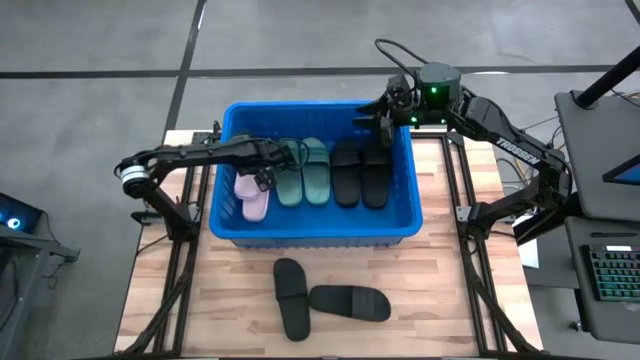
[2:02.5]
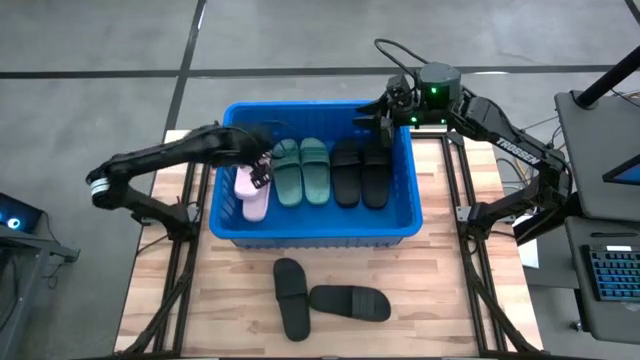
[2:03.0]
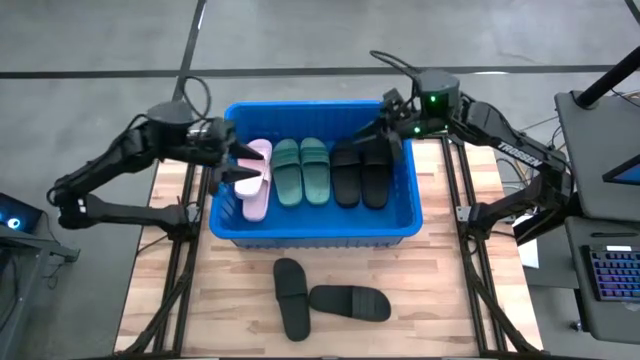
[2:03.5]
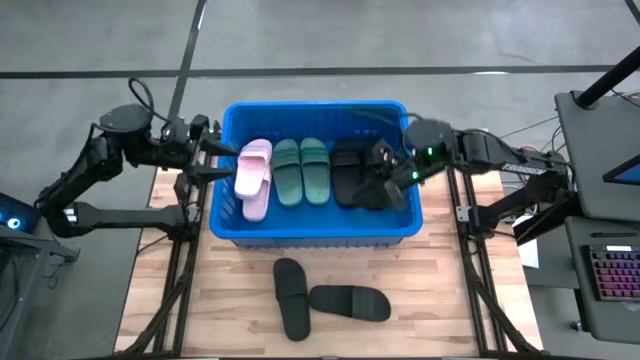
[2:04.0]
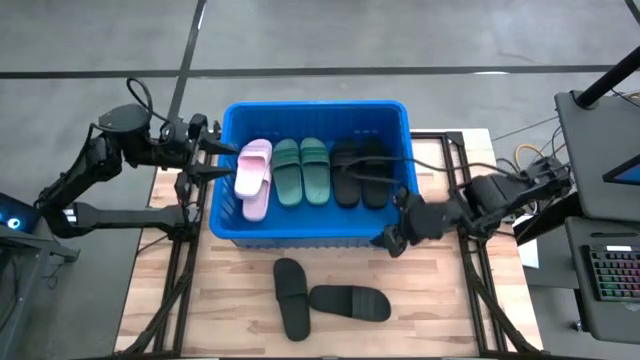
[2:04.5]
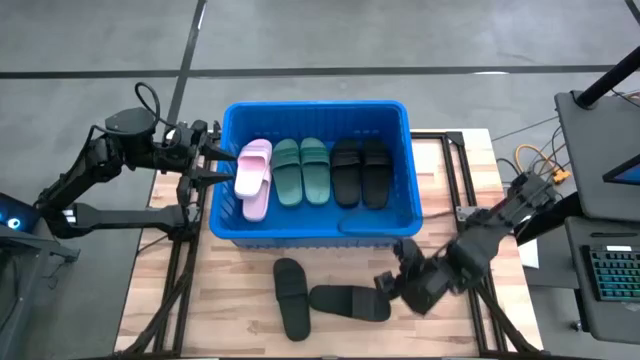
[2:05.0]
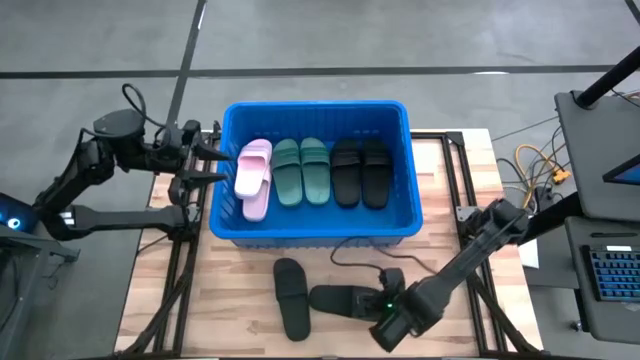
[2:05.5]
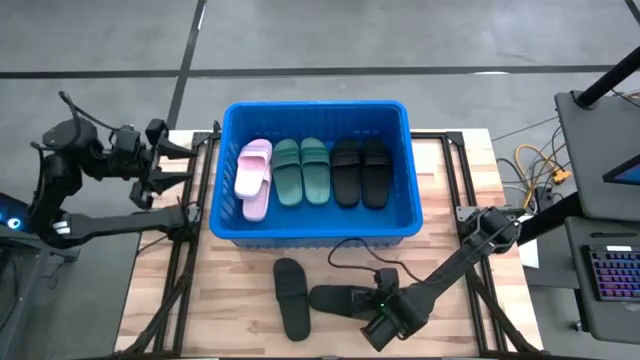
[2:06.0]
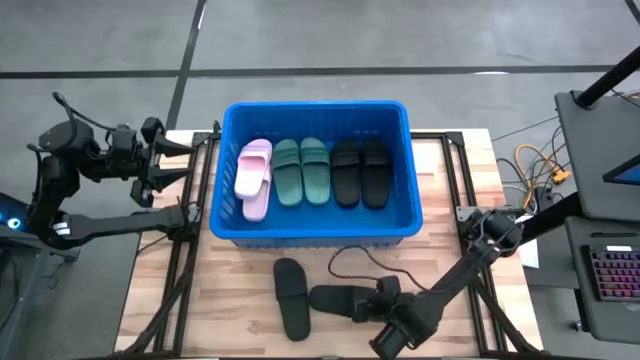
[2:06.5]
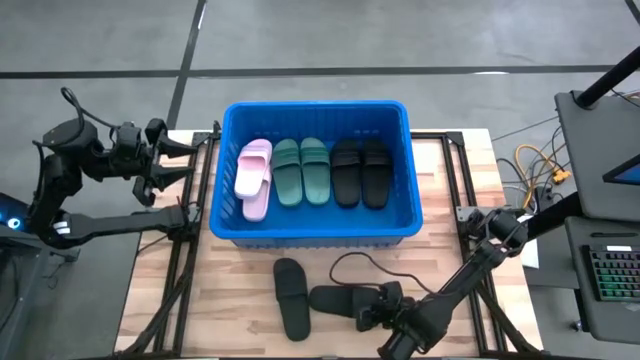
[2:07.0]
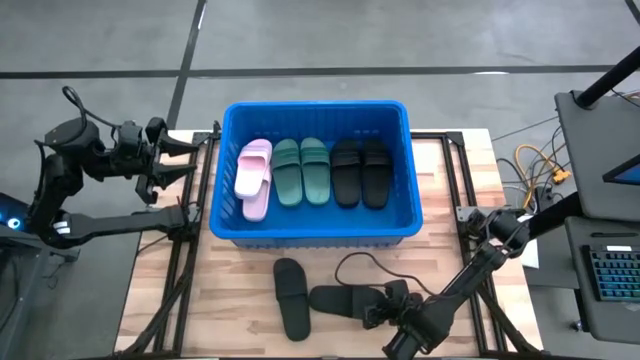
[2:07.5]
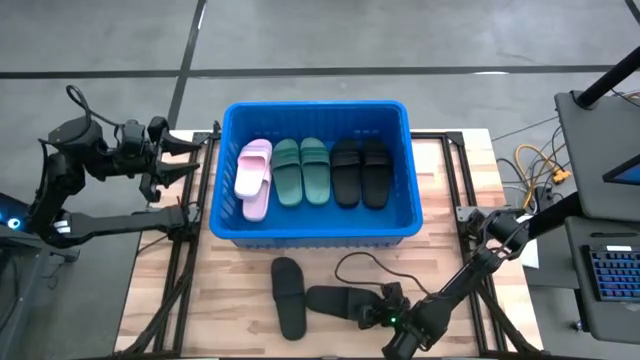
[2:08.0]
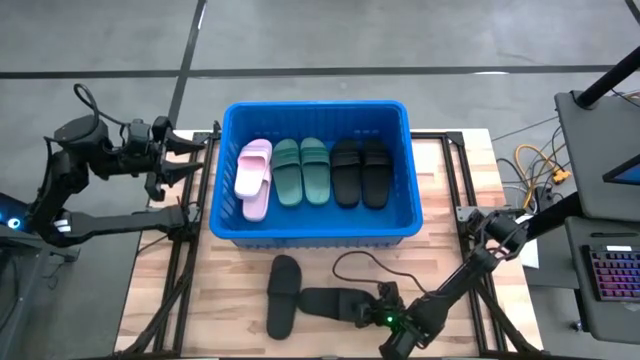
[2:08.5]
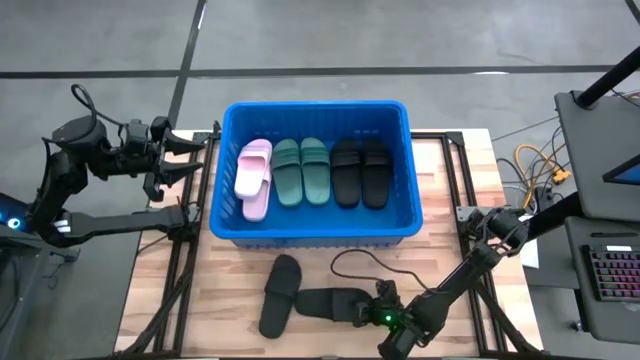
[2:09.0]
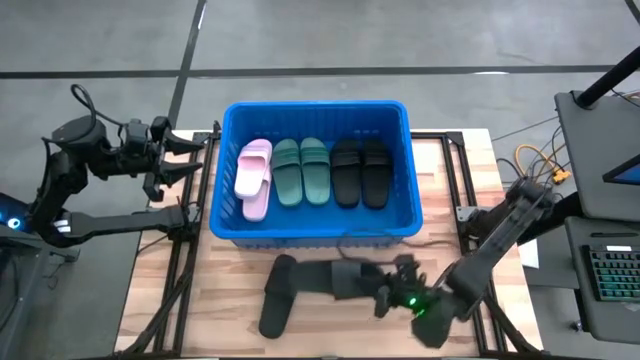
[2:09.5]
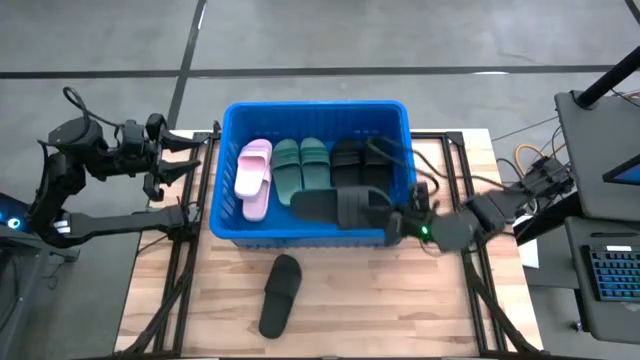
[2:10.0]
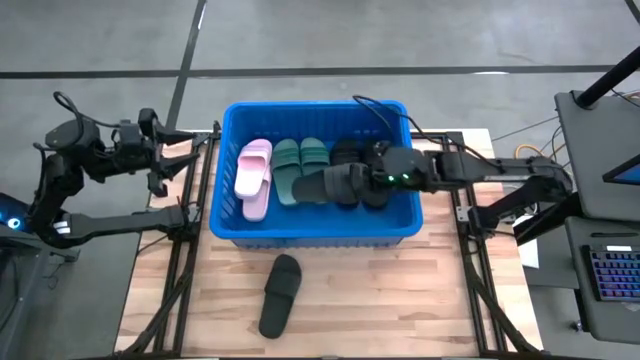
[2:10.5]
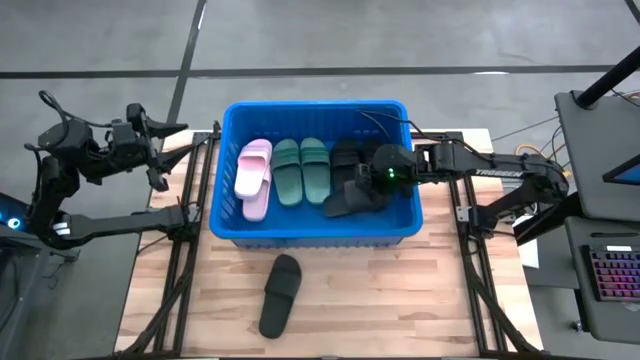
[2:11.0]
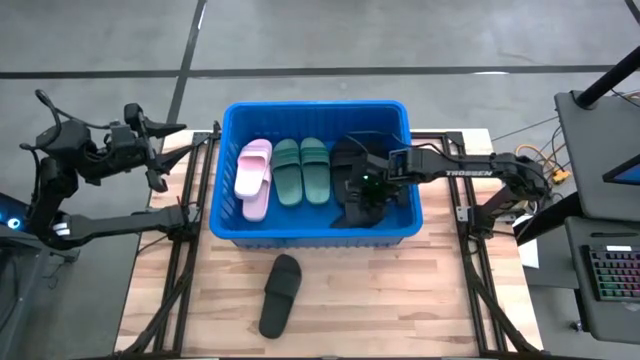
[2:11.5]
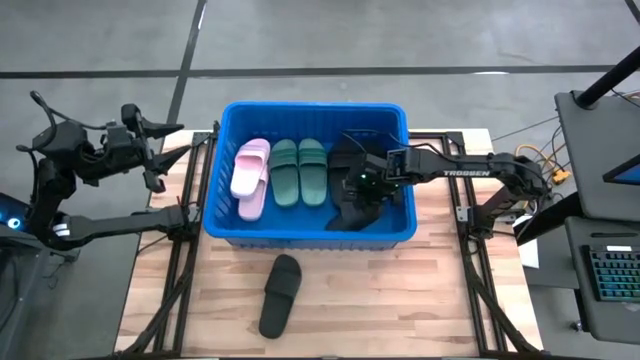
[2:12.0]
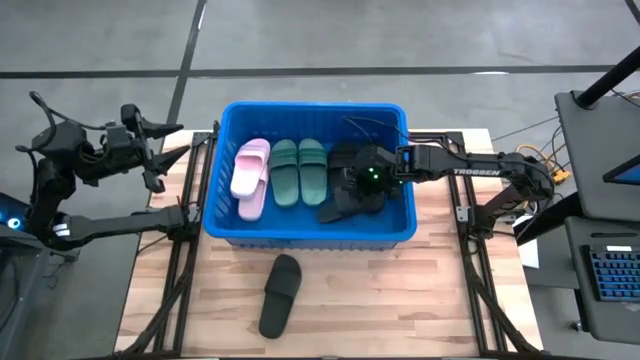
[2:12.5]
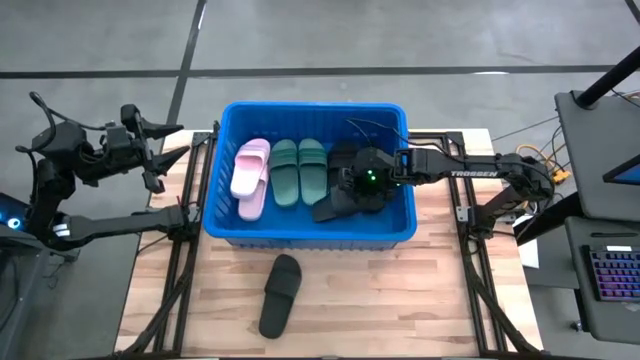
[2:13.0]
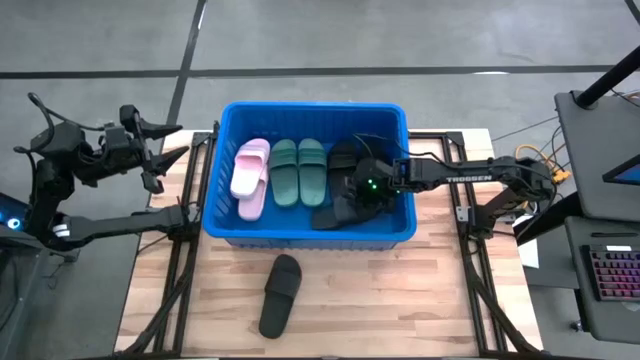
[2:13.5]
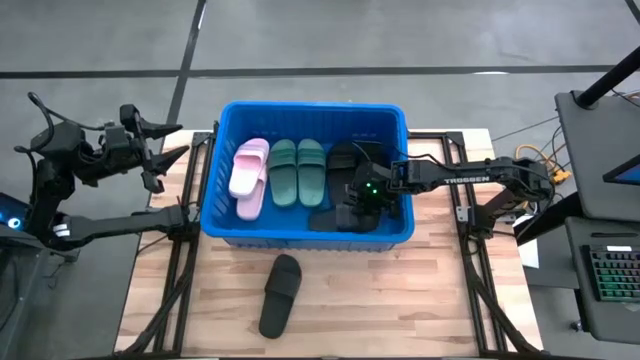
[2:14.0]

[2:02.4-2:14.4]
Task: Pick and place slides into bin
Put the black slide into the blue container

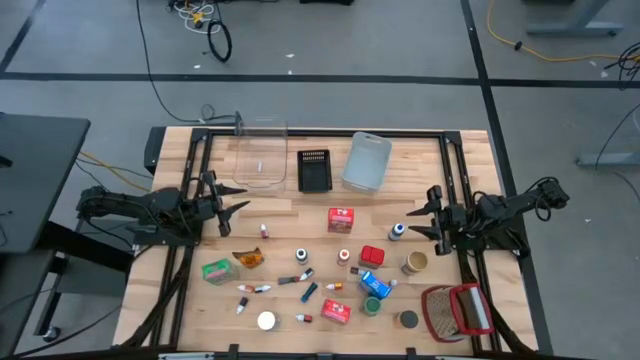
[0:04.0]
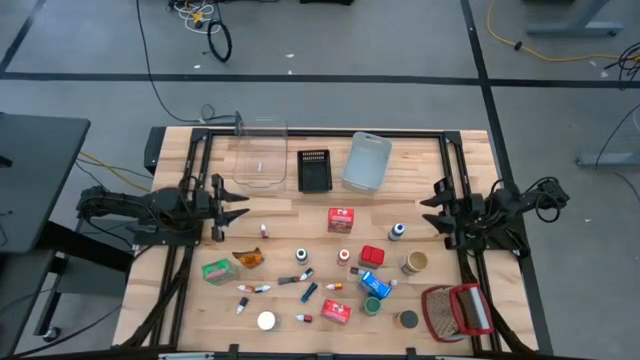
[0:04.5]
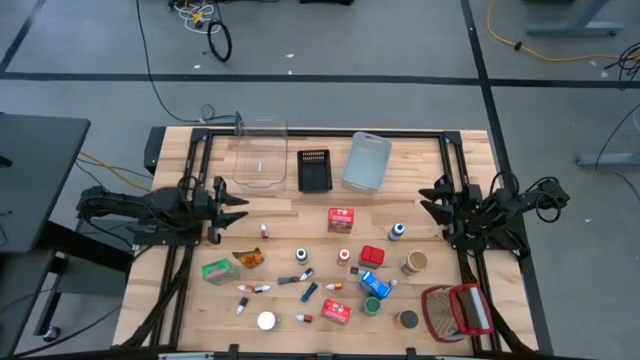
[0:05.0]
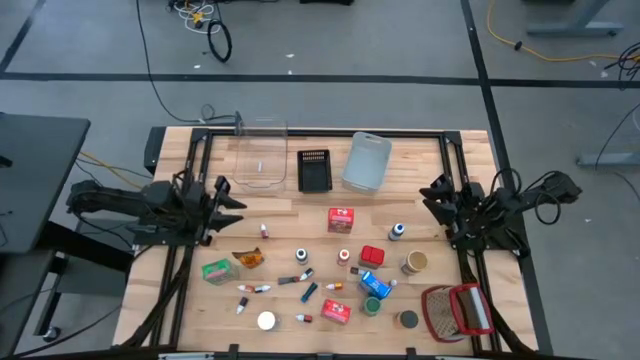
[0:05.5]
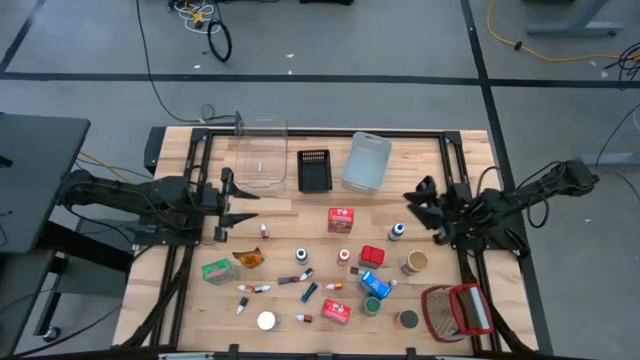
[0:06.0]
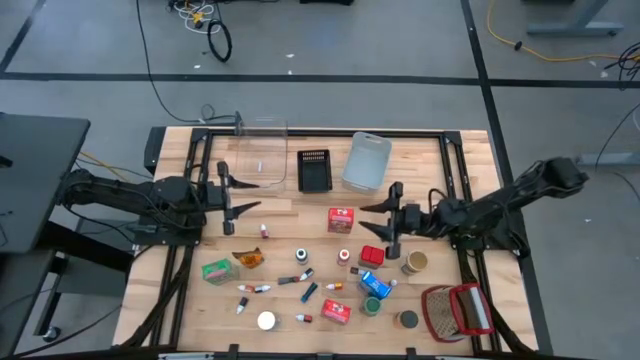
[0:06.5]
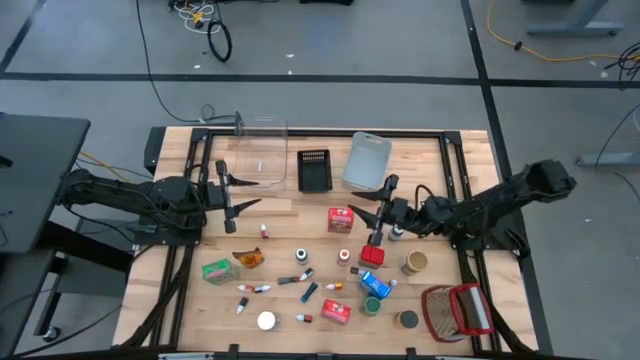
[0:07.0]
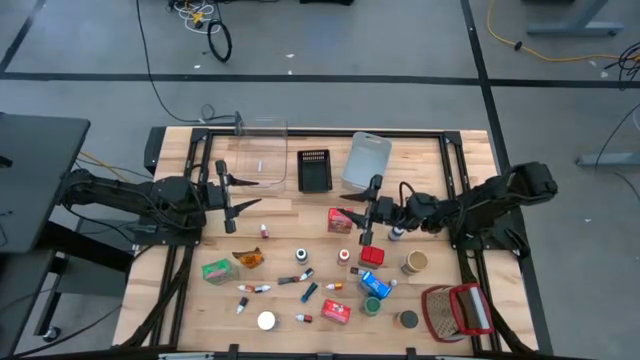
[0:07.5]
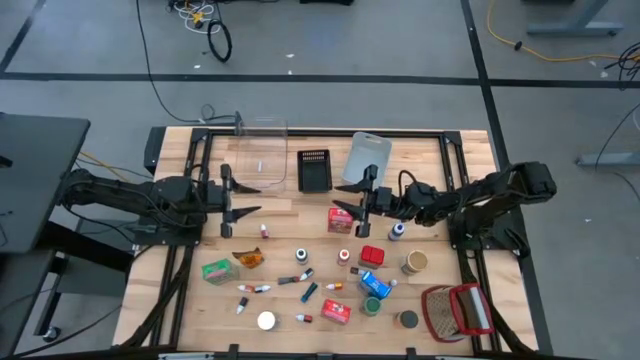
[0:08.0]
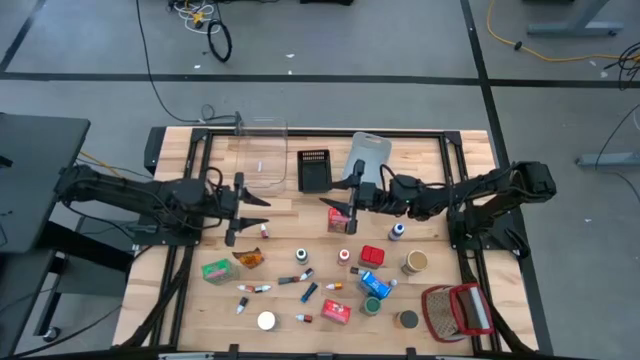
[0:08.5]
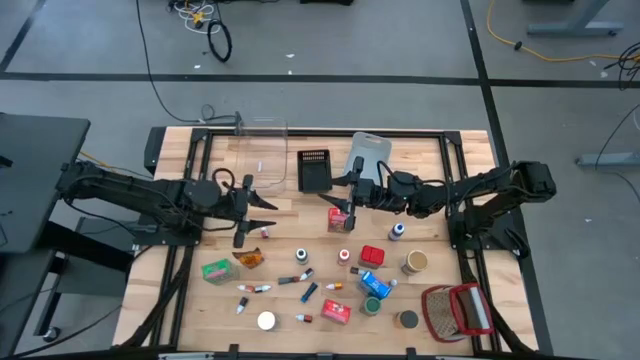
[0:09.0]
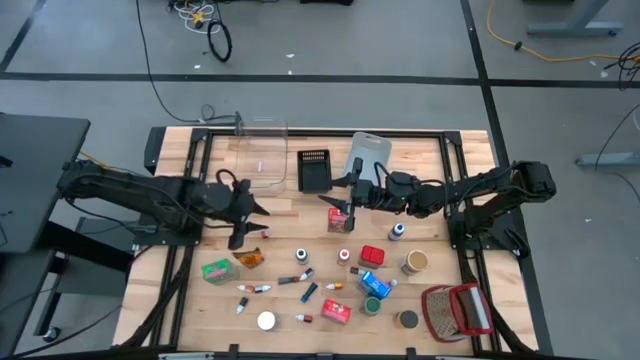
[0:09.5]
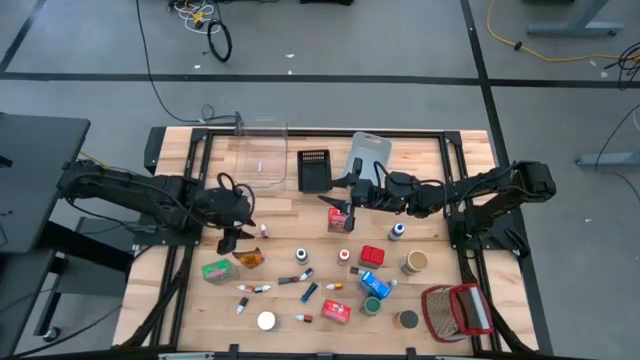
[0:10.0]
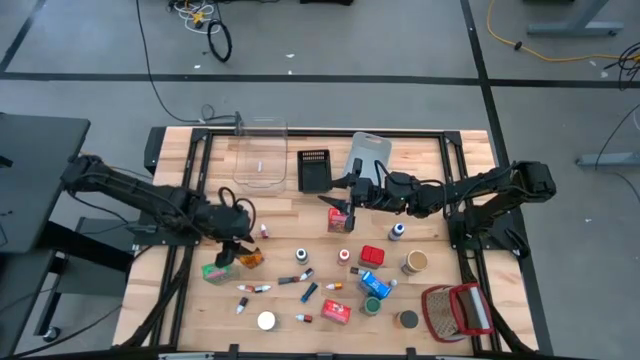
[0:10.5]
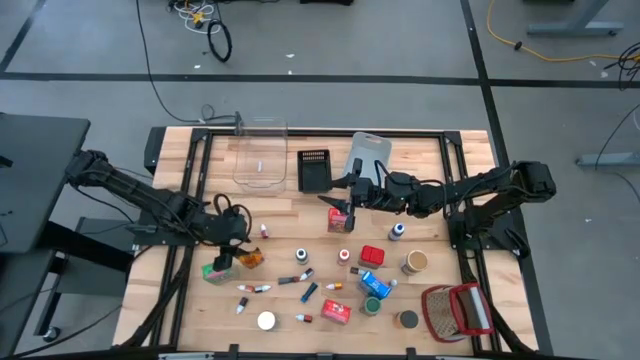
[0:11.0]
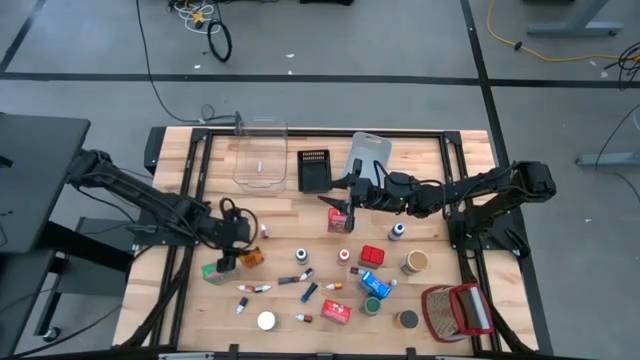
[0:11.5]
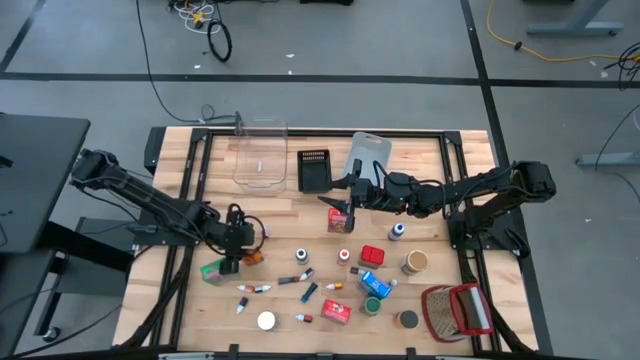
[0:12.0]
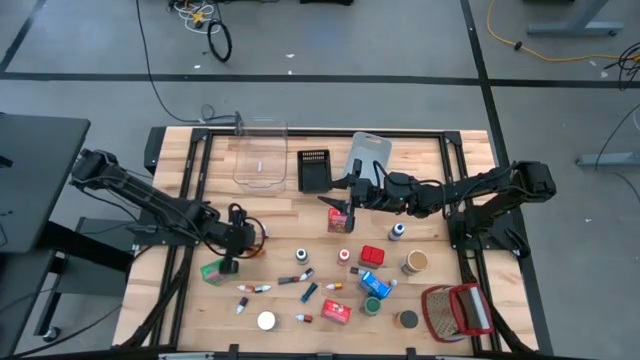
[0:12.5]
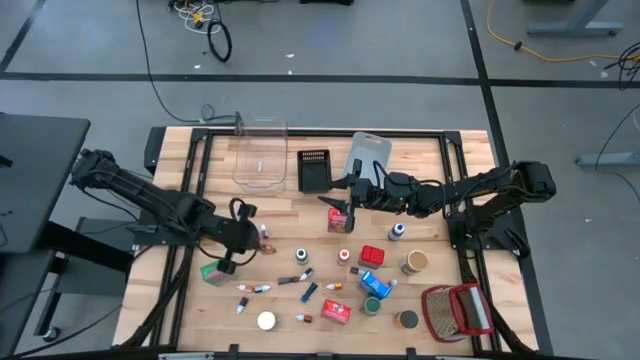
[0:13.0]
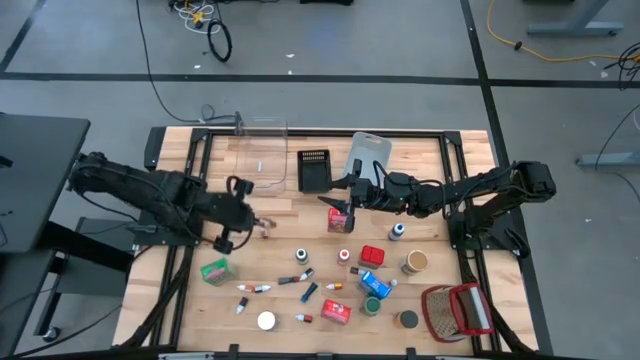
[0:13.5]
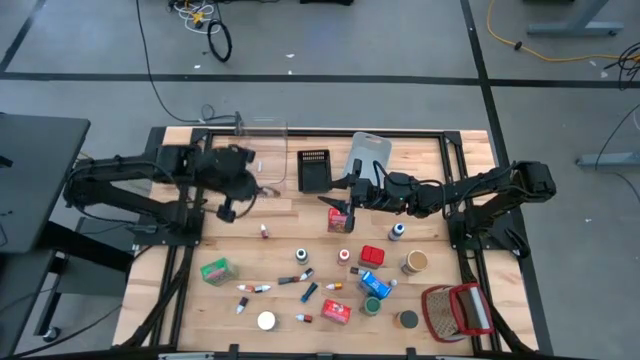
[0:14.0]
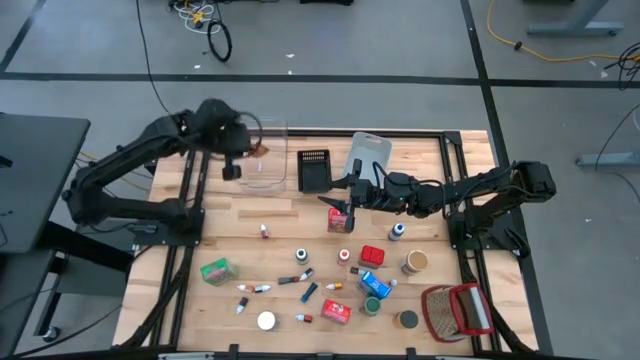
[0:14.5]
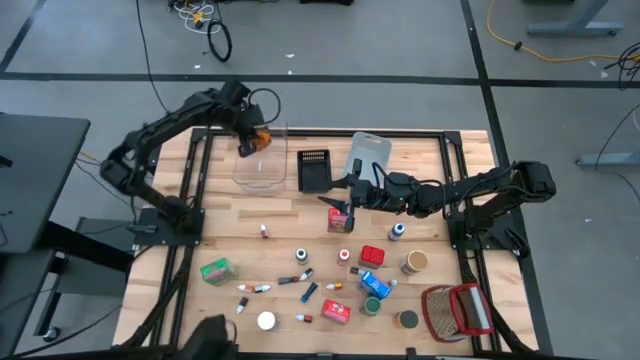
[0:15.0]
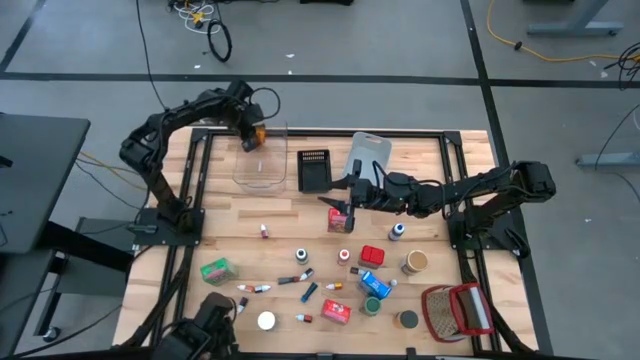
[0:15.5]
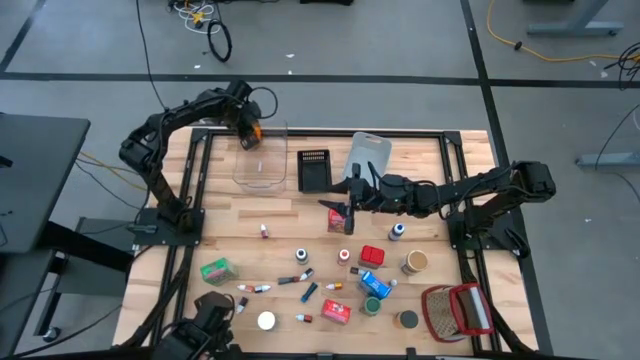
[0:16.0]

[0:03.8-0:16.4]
Task: Pick & Place Kitchen Items
Put the orange seasoning pack into the transparent bin
